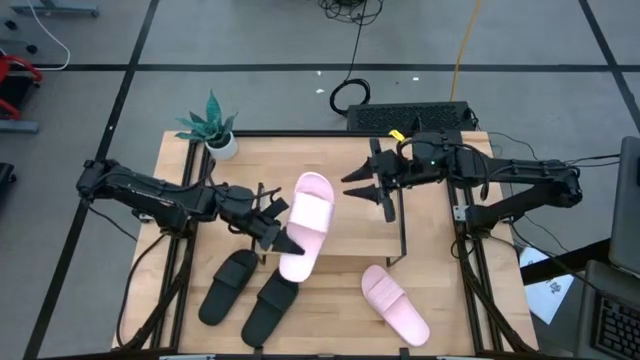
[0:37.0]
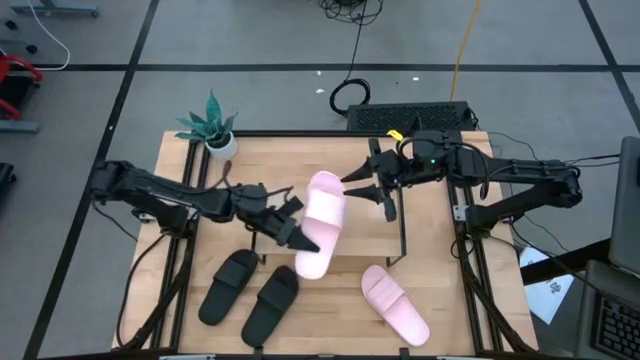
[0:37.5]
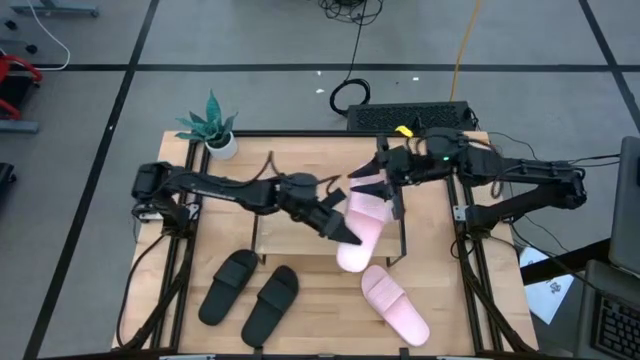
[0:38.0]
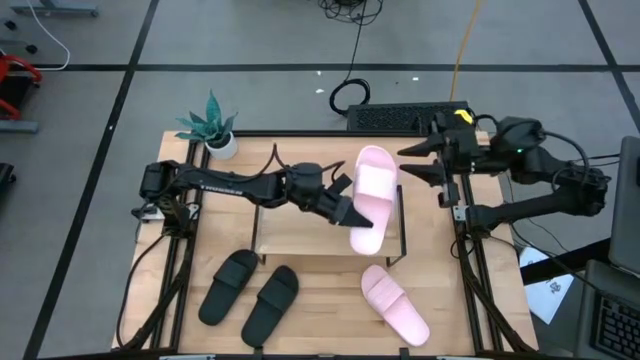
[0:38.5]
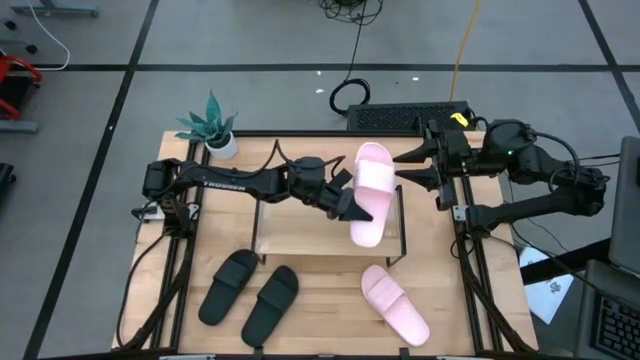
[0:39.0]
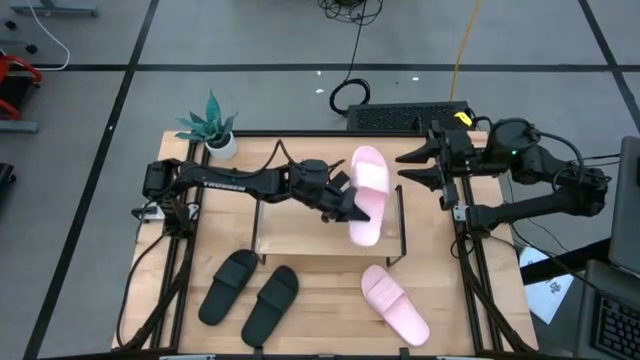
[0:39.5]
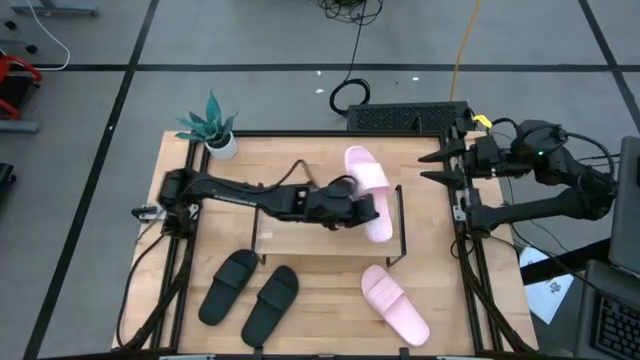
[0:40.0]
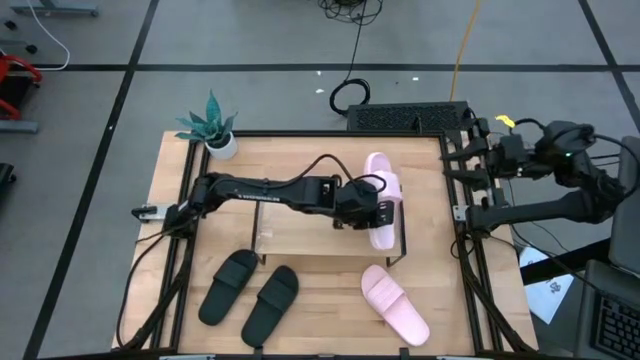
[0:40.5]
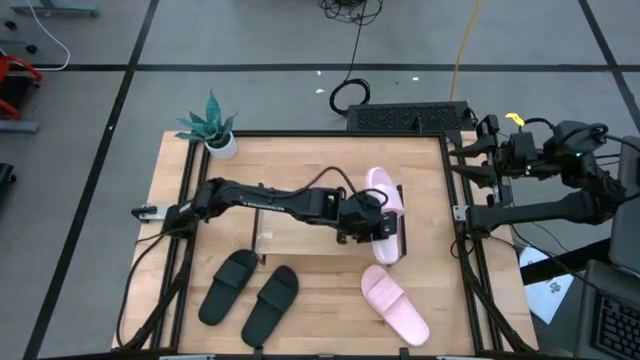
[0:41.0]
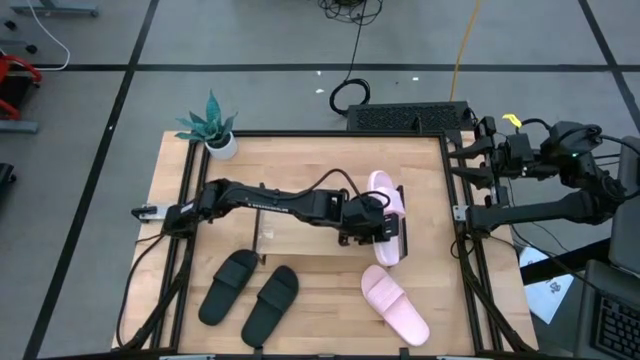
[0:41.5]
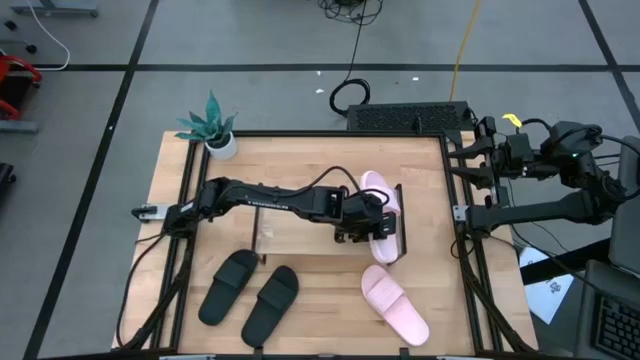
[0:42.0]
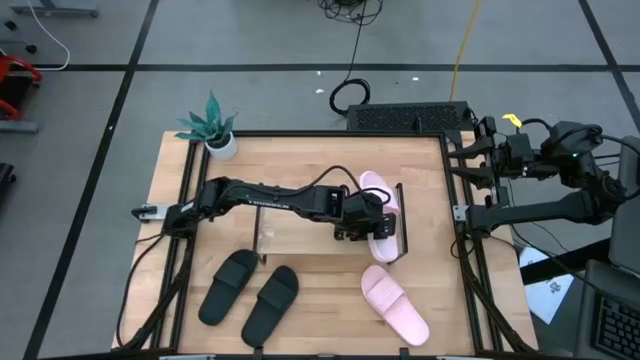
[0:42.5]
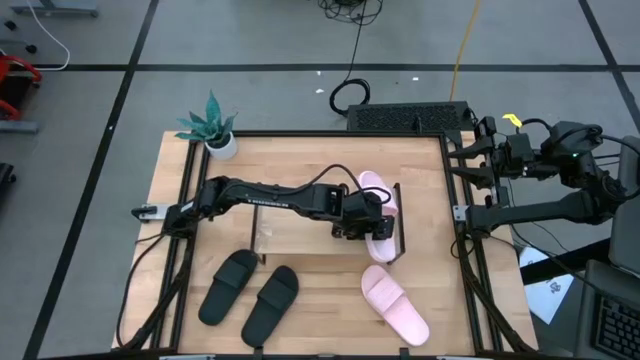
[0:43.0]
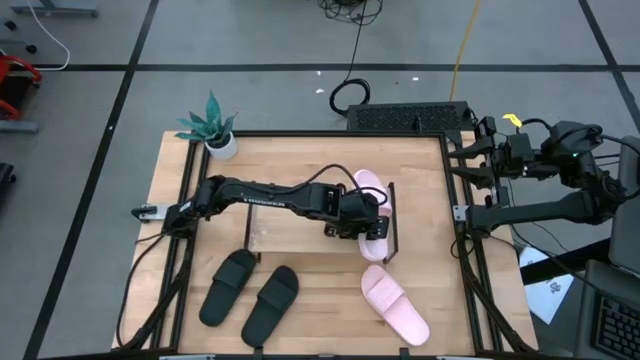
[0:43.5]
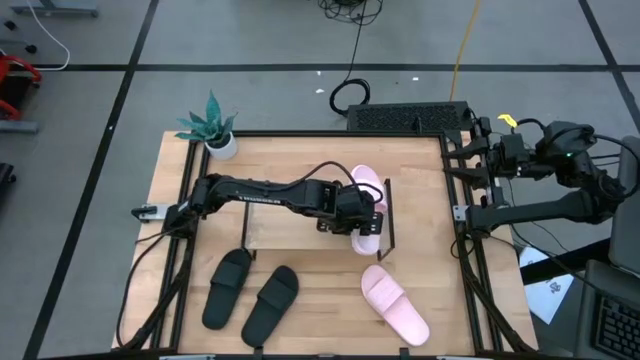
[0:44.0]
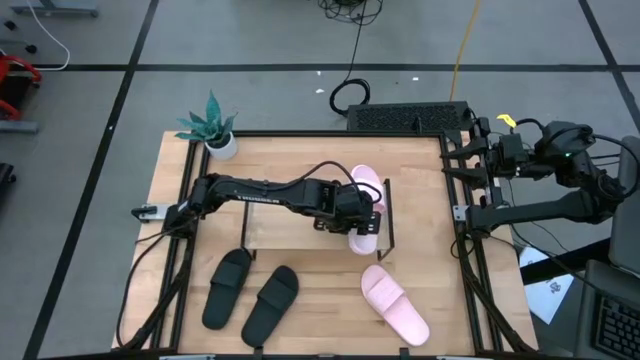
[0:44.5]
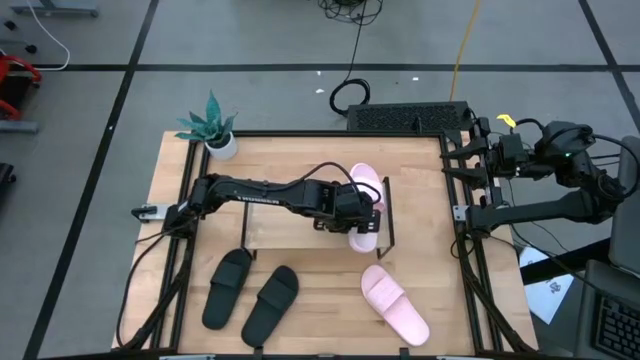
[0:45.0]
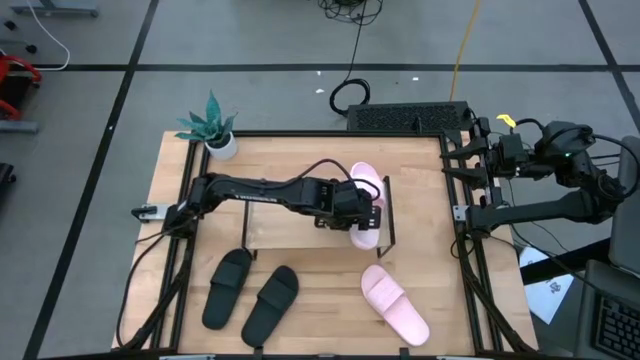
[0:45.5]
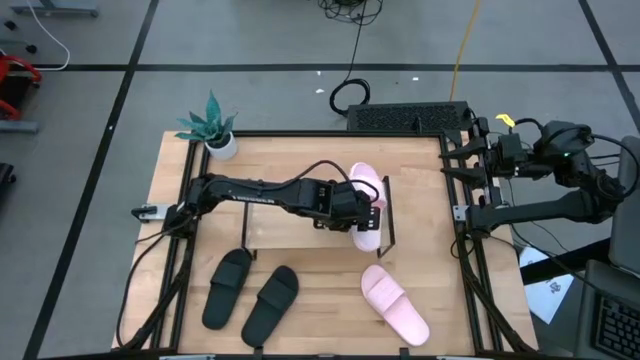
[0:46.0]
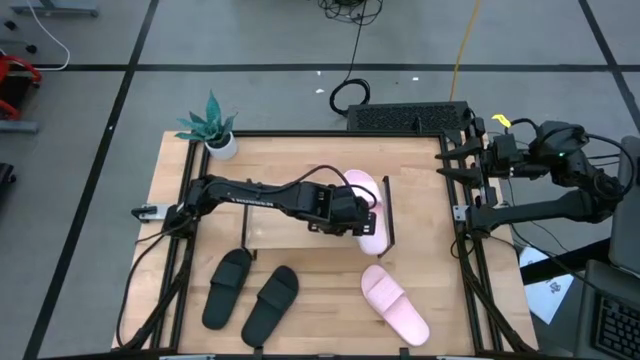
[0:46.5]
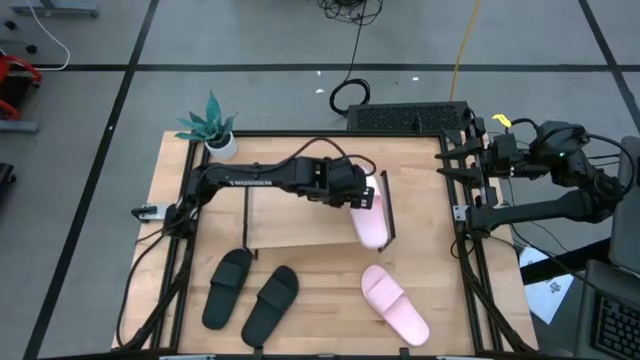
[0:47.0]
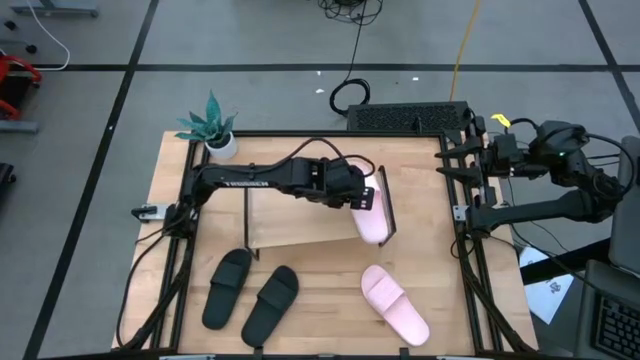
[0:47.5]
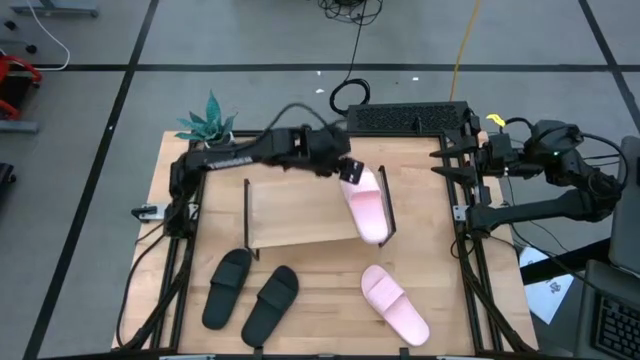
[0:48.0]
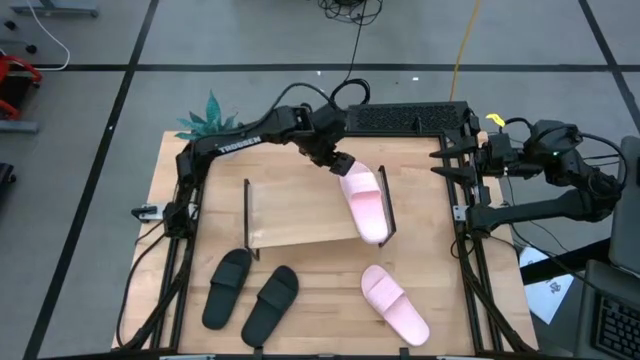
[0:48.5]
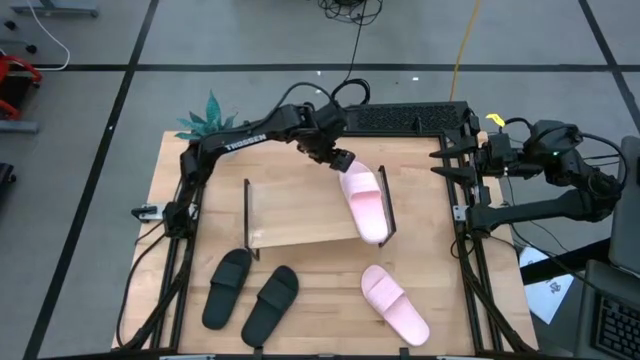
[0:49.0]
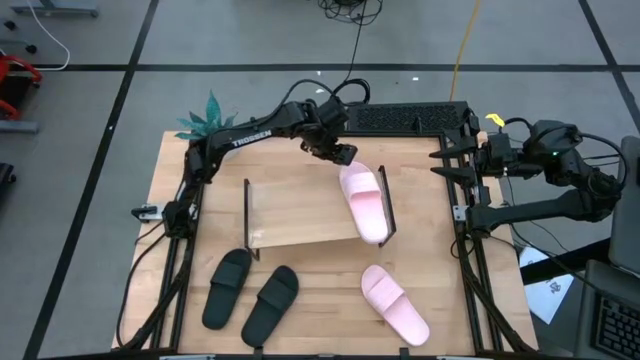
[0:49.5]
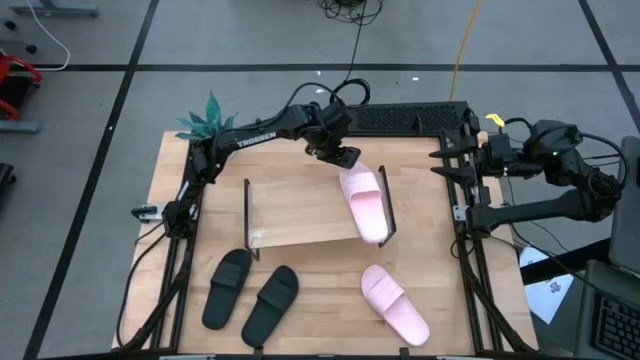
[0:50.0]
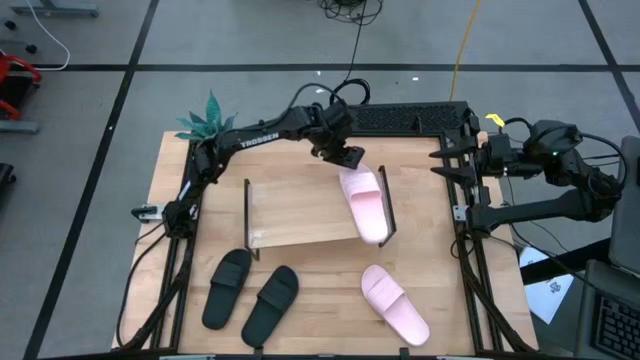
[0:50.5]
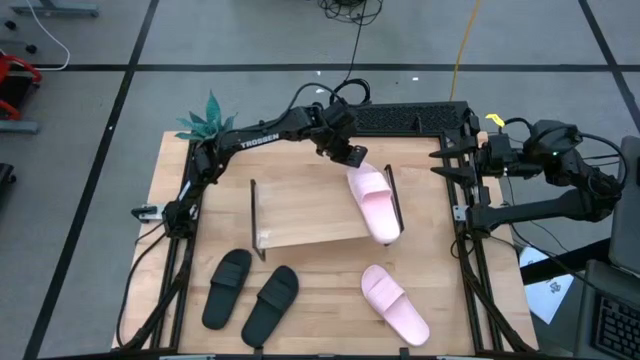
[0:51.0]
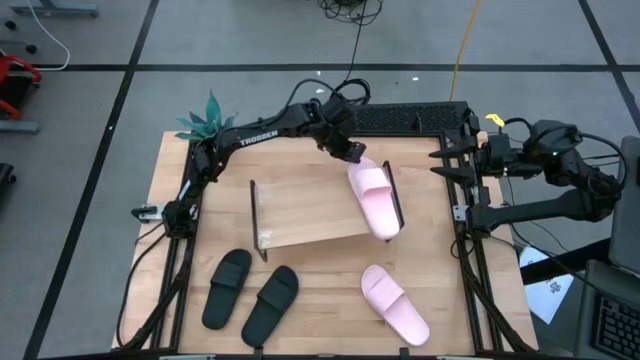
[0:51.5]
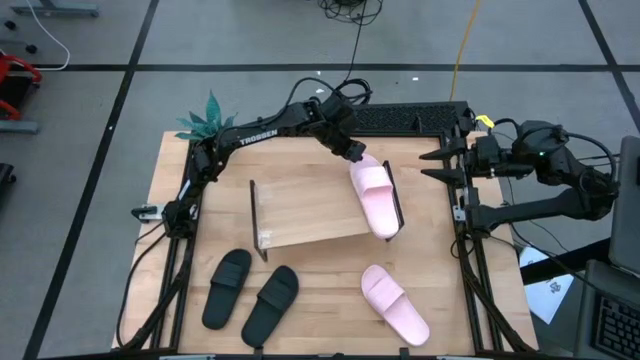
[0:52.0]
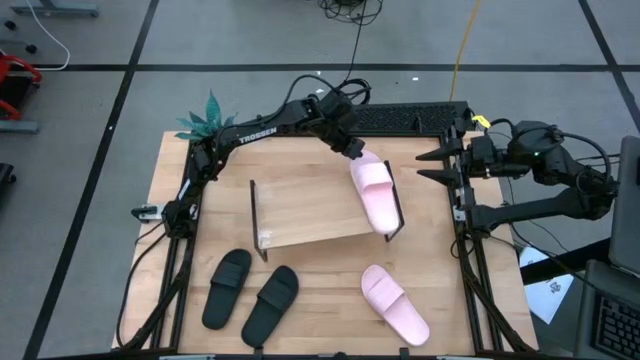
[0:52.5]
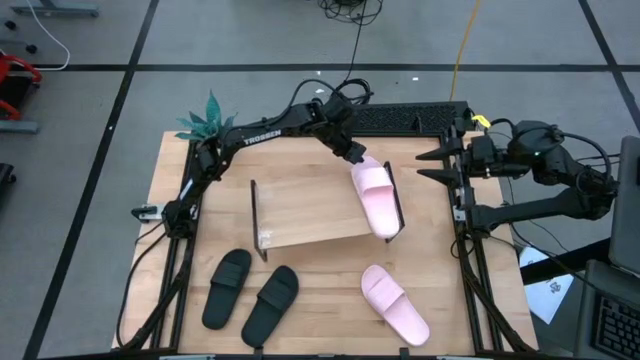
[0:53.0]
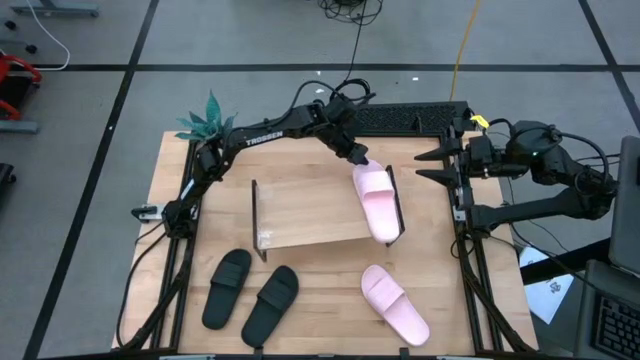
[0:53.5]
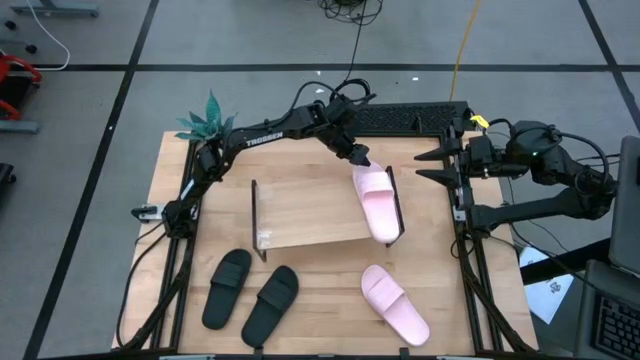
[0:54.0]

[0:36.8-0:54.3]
Task: Pick and place slides into the shelf
Put the right pink slipper on the shelf
